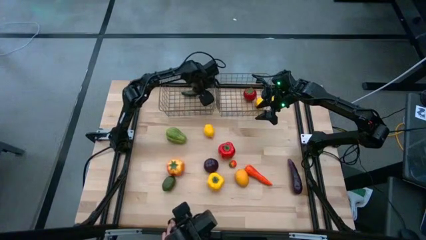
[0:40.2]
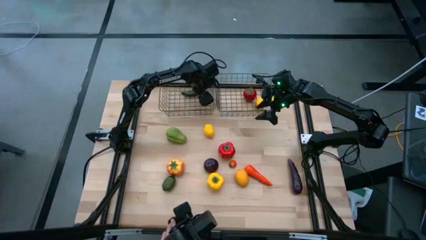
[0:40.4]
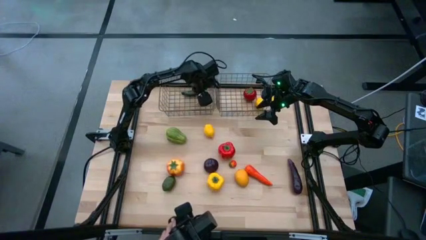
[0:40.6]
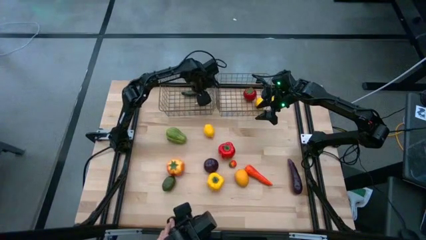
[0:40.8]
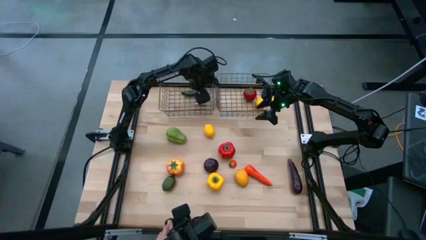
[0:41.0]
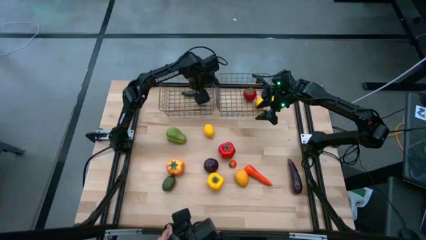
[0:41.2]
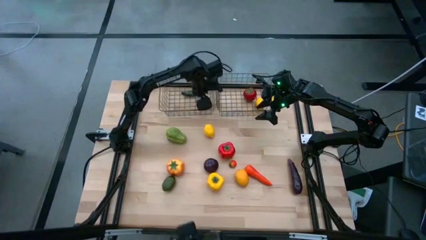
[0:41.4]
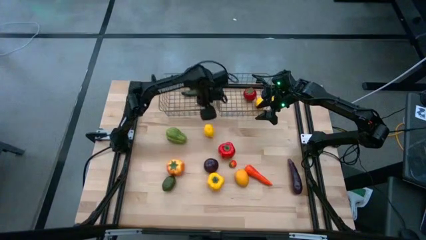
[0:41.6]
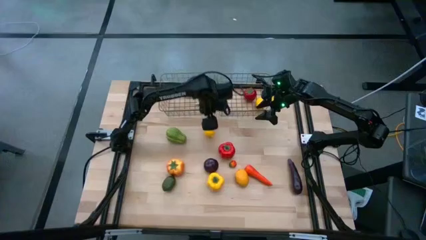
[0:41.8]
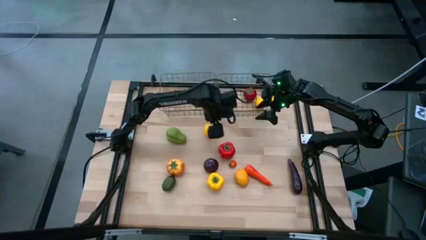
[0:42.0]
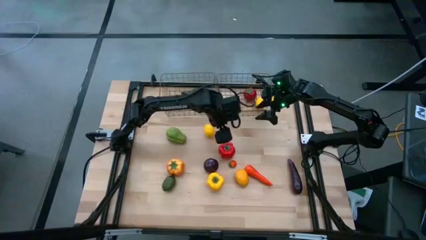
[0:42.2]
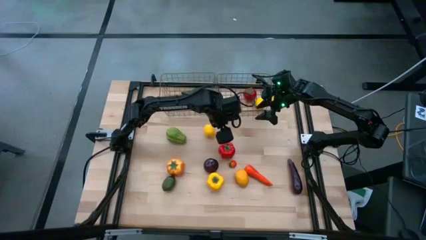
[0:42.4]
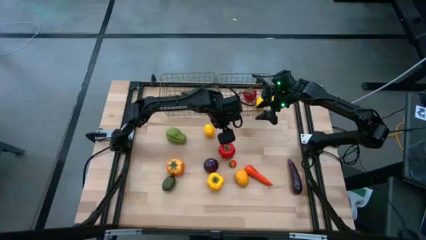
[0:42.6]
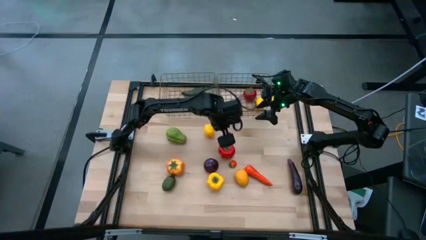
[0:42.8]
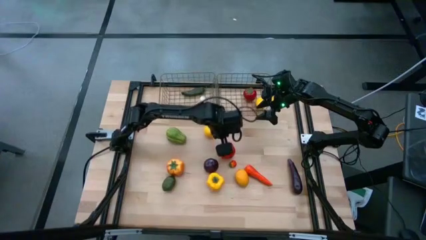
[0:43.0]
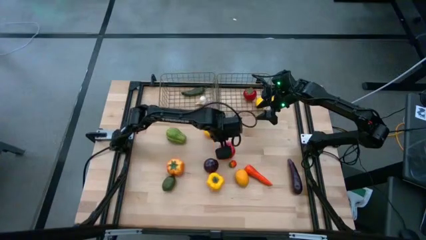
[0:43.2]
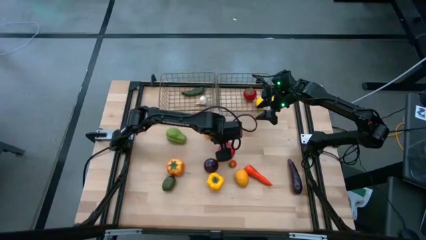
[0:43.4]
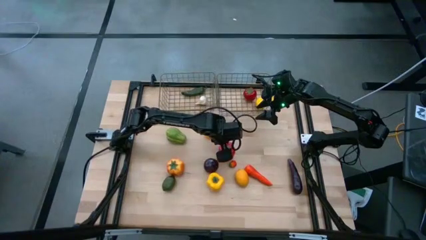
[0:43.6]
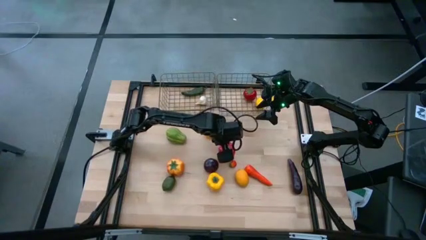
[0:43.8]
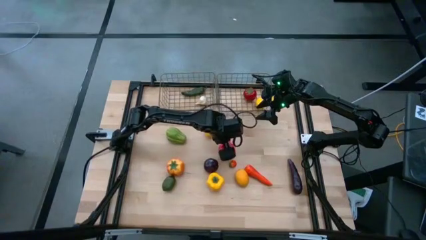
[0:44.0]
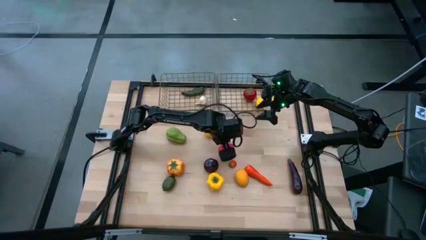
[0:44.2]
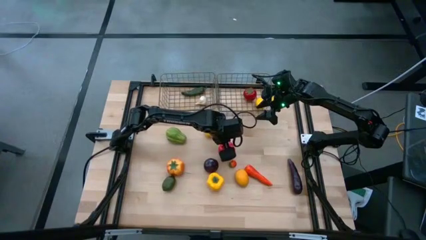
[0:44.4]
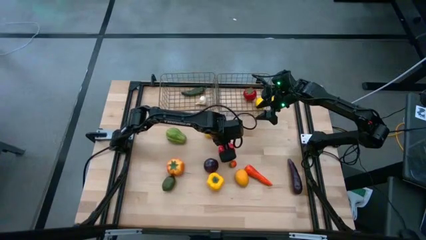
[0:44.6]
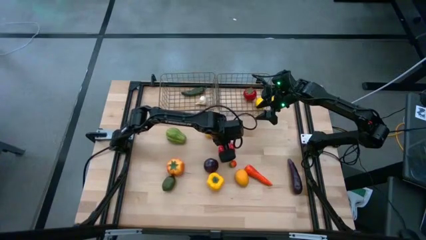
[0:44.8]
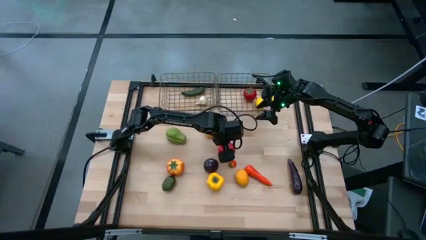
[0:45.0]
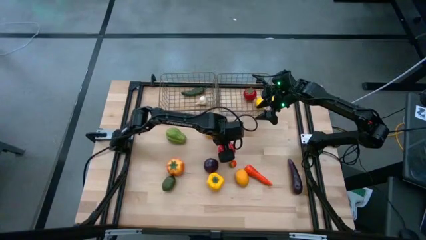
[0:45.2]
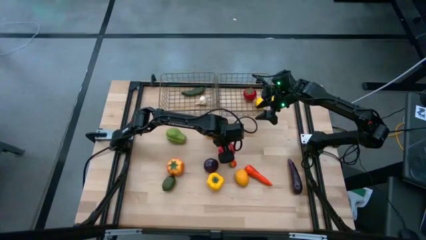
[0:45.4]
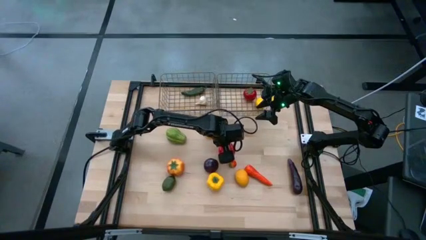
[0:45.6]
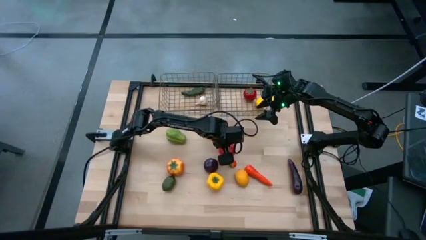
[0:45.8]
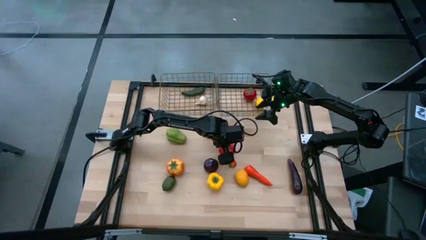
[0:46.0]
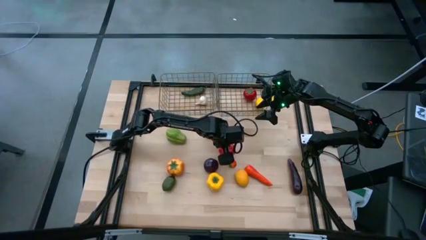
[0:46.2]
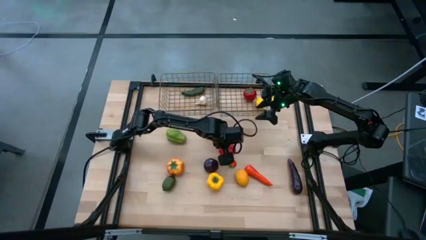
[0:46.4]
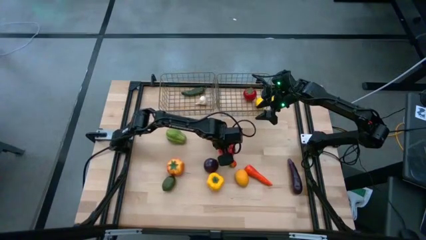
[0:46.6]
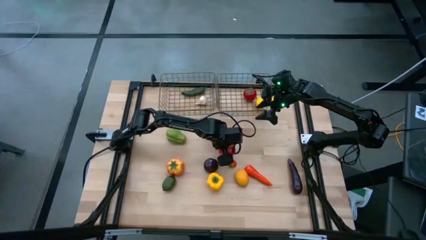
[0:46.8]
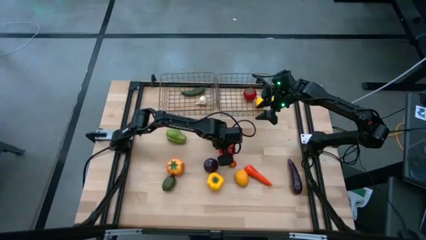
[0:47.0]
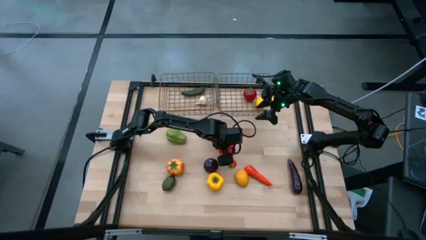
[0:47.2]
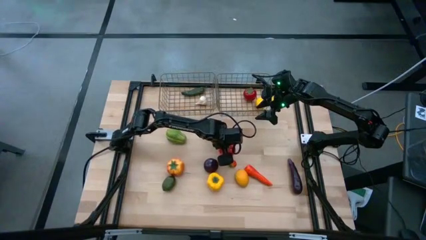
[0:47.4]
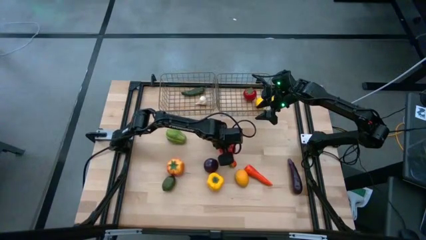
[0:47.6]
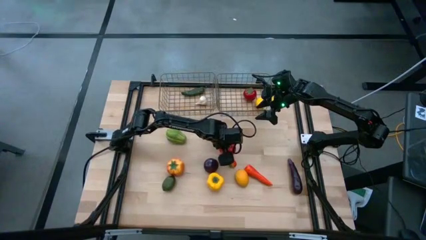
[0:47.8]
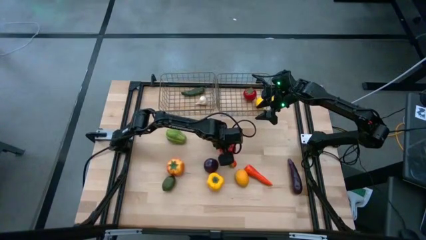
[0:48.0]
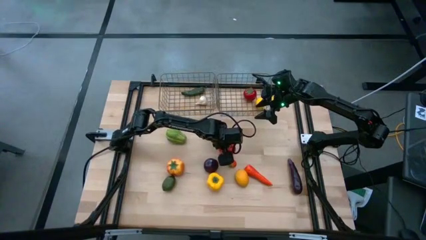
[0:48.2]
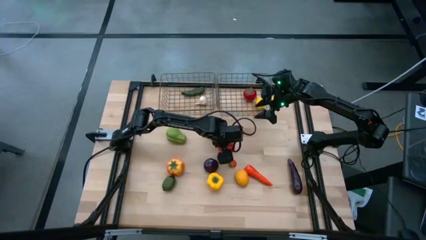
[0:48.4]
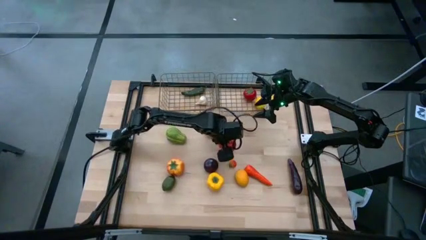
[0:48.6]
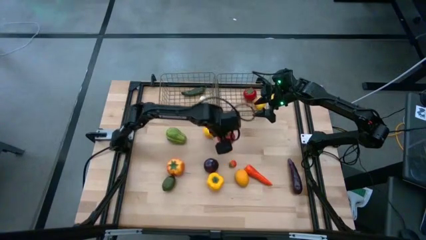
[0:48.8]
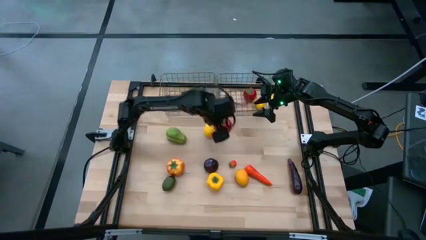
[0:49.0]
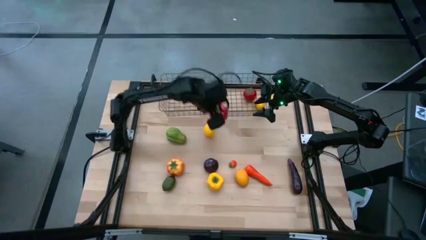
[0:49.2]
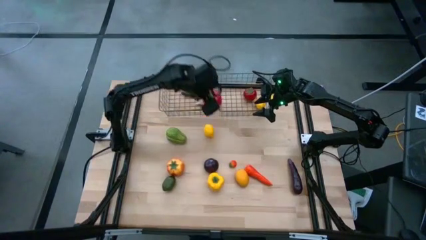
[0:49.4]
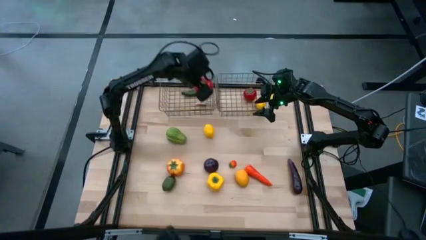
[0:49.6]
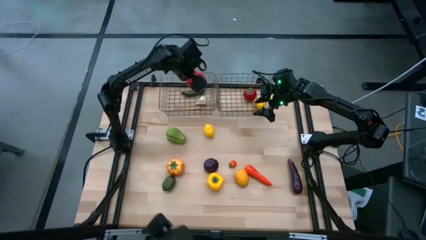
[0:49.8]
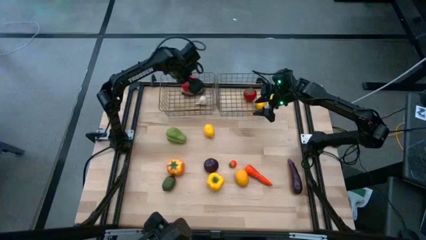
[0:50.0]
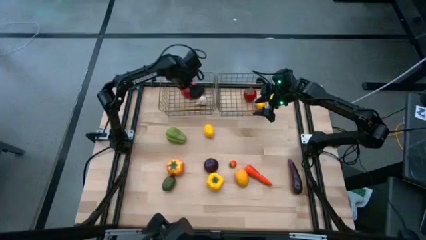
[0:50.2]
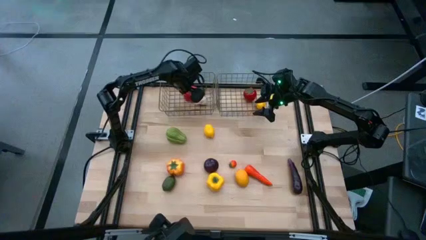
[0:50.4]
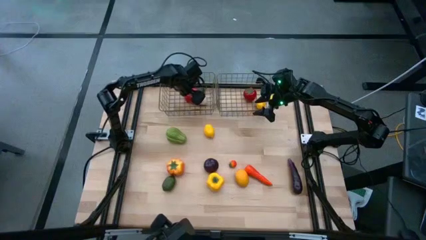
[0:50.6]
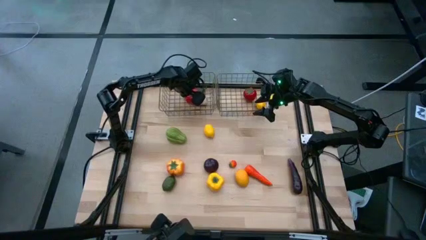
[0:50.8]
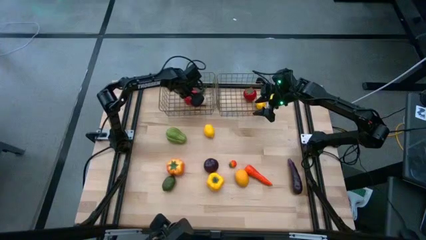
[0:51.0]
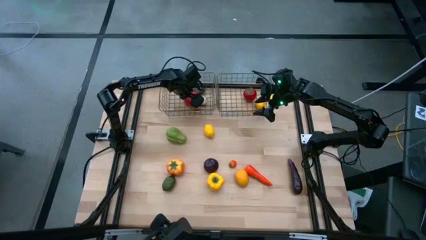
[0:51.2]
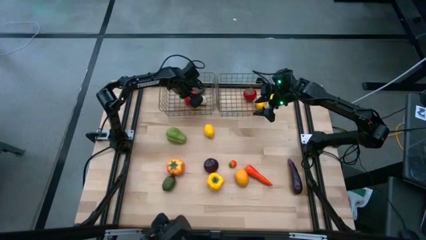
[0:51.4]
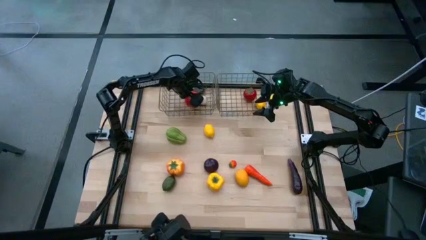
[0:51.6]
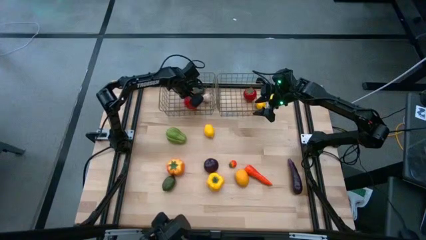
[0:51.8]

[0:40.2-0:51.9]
Task: Sort produce into baskets
Put the red bell pepper into the left golden wire basket
